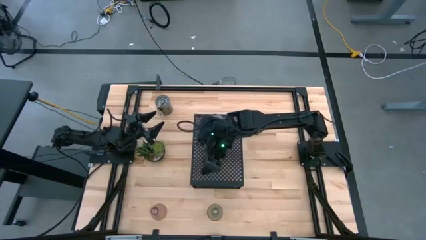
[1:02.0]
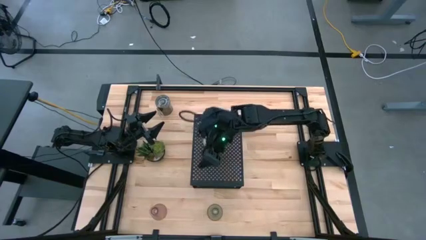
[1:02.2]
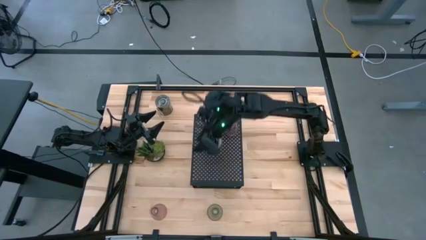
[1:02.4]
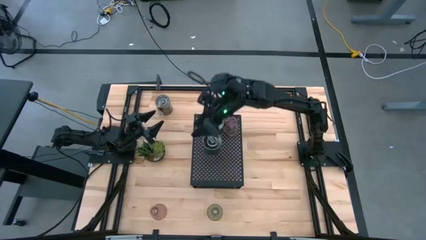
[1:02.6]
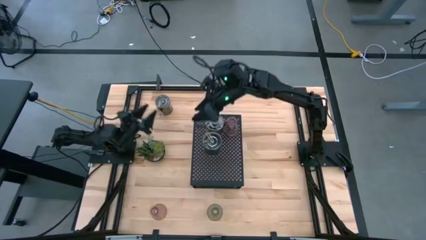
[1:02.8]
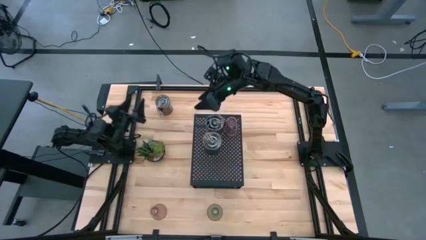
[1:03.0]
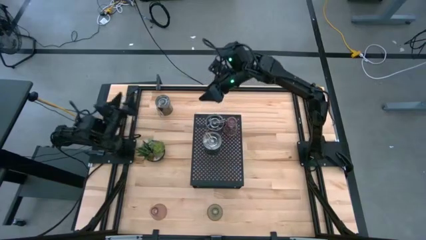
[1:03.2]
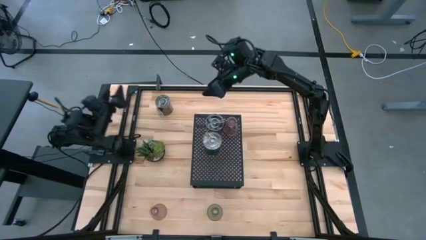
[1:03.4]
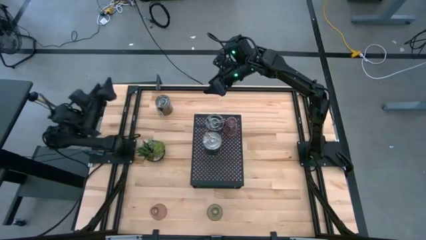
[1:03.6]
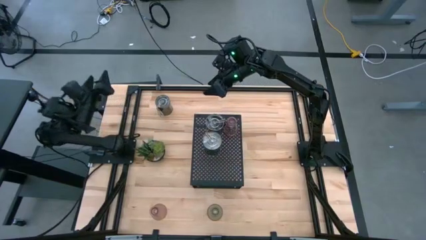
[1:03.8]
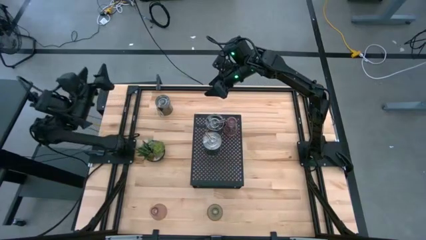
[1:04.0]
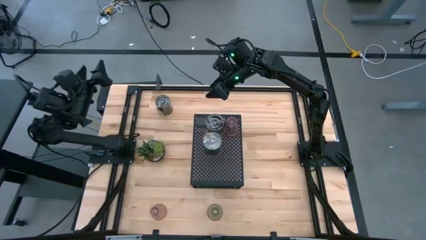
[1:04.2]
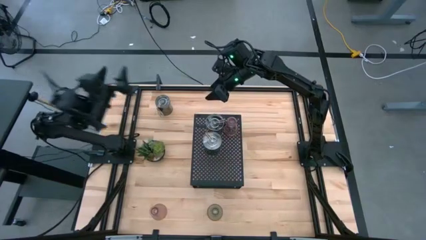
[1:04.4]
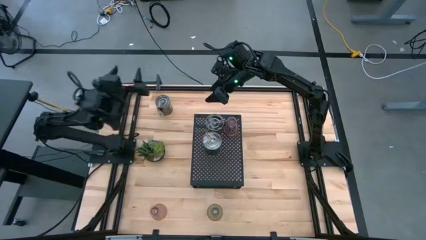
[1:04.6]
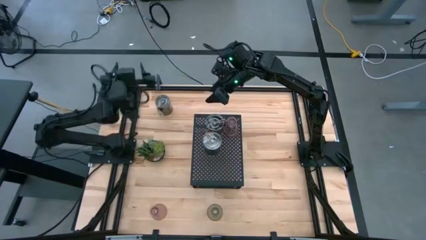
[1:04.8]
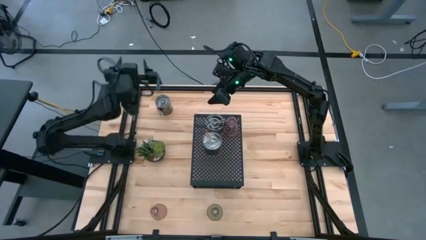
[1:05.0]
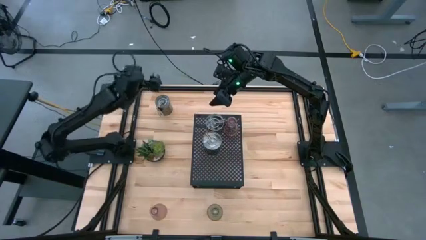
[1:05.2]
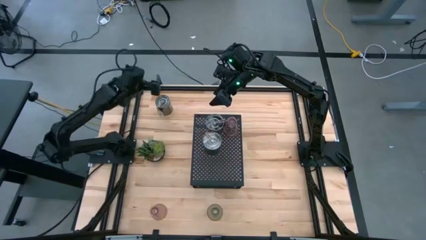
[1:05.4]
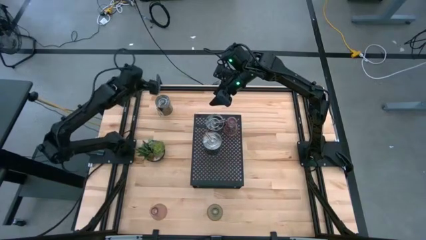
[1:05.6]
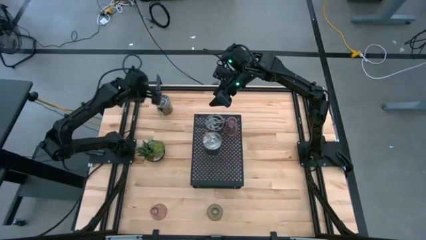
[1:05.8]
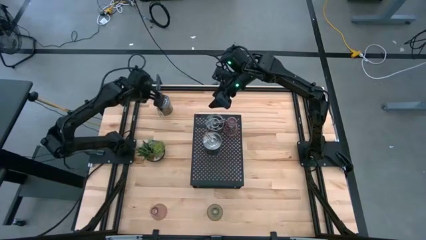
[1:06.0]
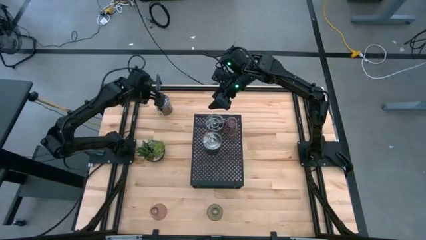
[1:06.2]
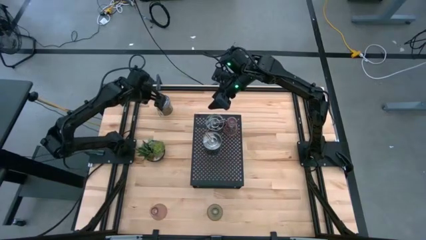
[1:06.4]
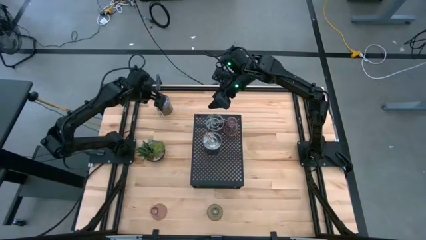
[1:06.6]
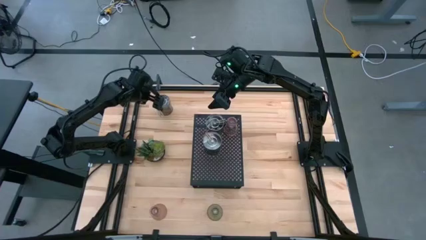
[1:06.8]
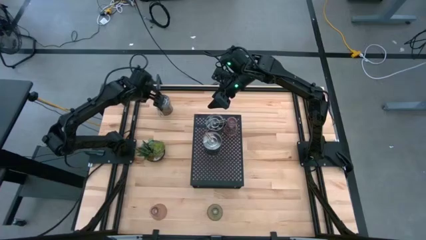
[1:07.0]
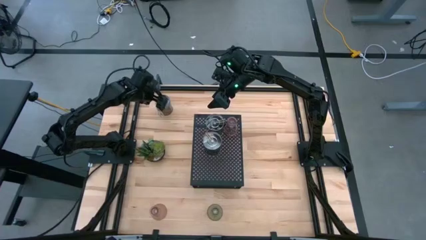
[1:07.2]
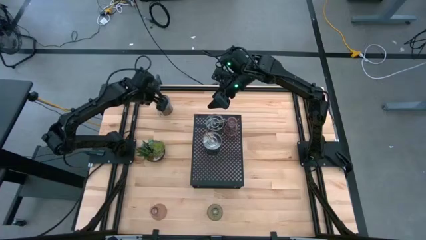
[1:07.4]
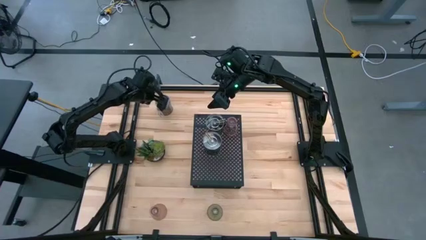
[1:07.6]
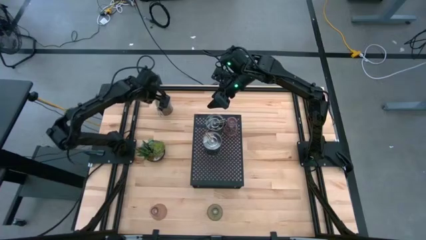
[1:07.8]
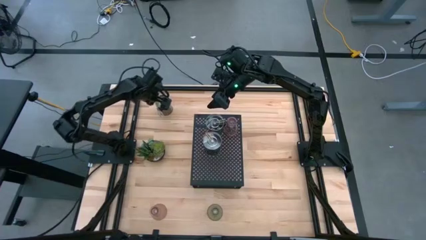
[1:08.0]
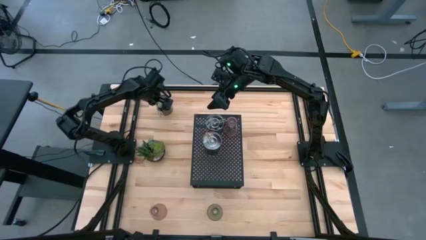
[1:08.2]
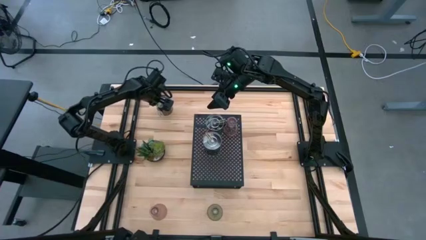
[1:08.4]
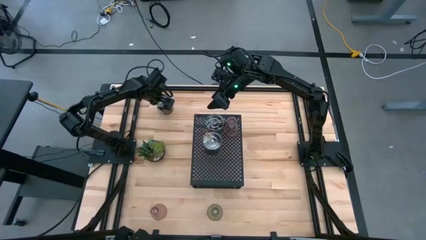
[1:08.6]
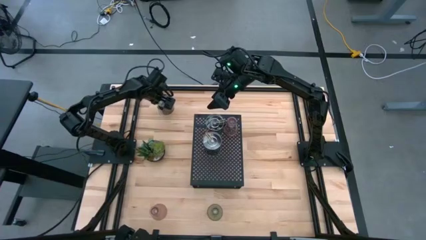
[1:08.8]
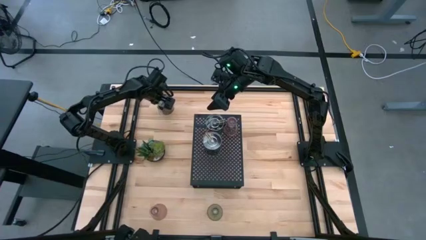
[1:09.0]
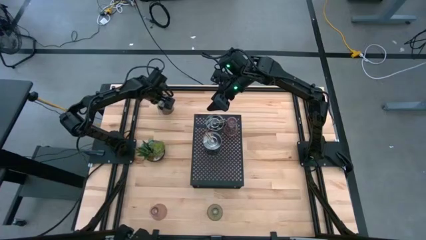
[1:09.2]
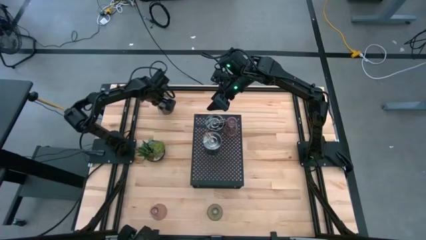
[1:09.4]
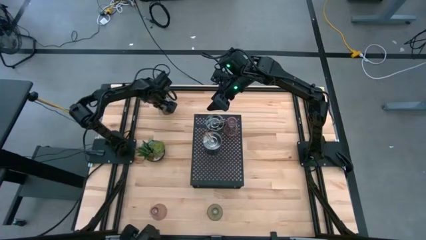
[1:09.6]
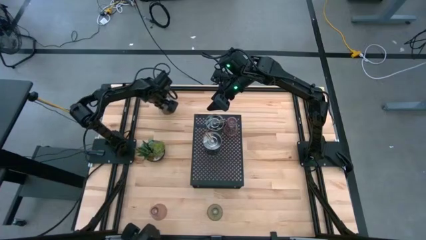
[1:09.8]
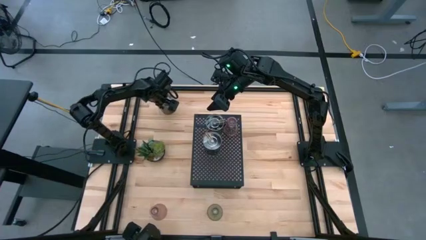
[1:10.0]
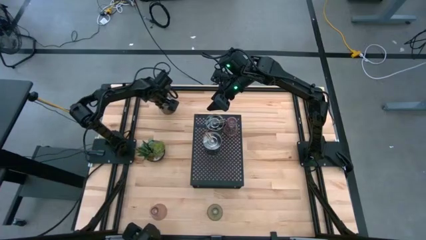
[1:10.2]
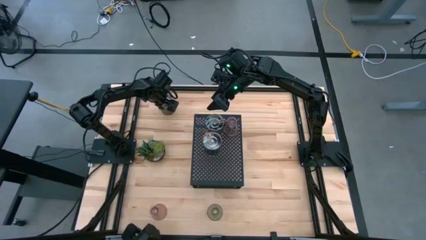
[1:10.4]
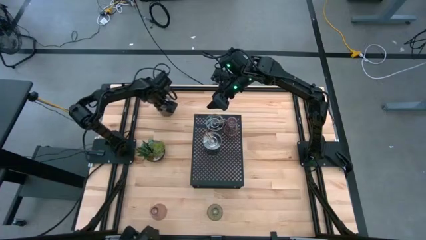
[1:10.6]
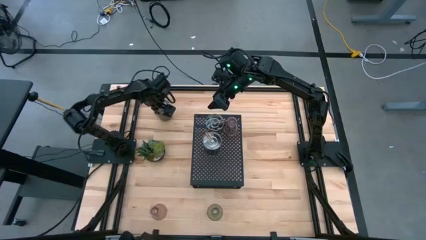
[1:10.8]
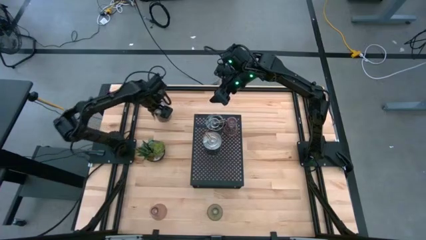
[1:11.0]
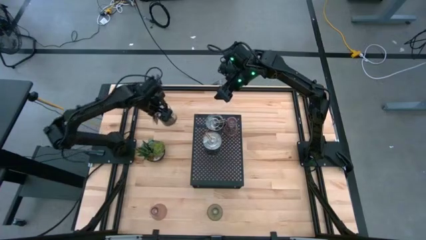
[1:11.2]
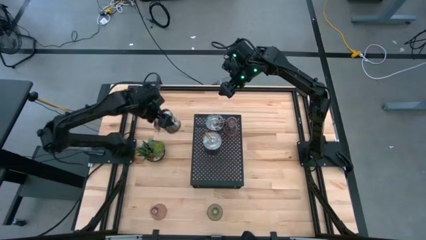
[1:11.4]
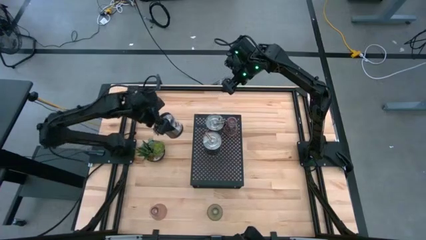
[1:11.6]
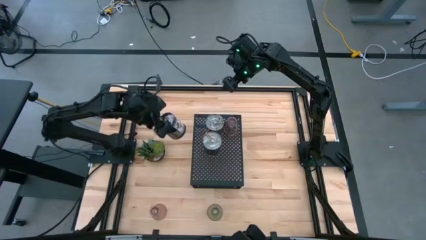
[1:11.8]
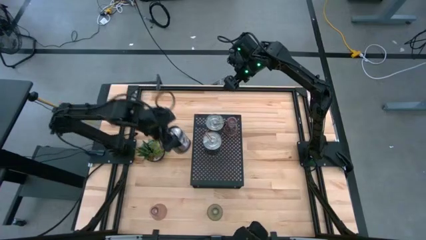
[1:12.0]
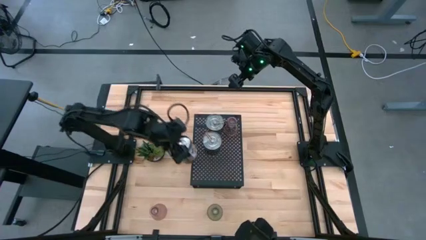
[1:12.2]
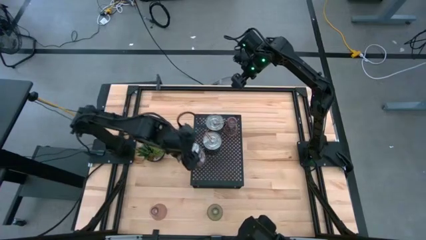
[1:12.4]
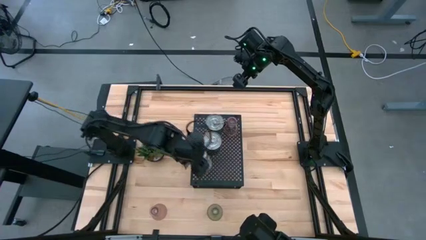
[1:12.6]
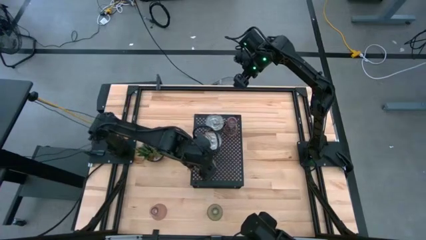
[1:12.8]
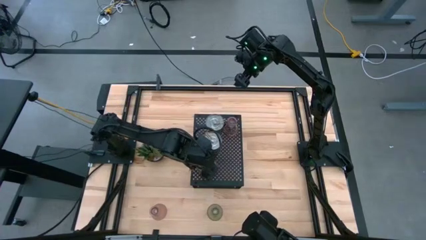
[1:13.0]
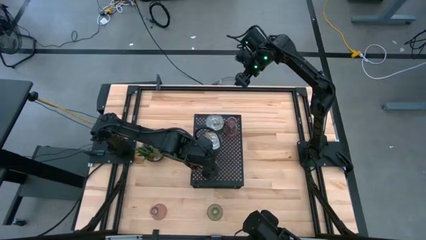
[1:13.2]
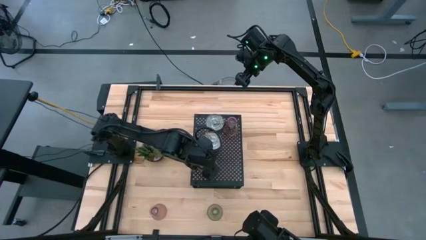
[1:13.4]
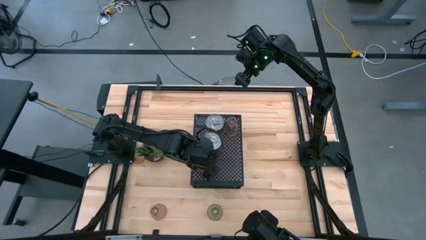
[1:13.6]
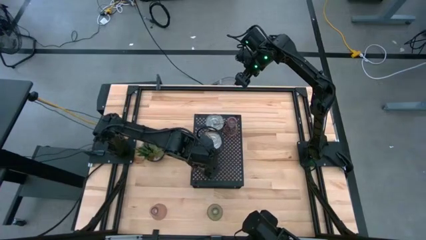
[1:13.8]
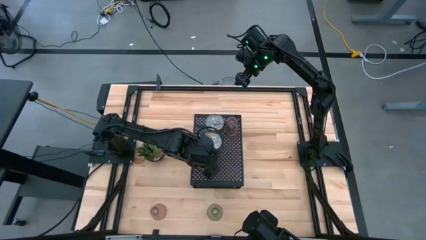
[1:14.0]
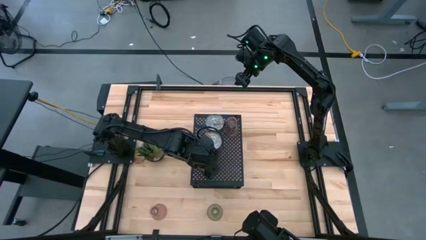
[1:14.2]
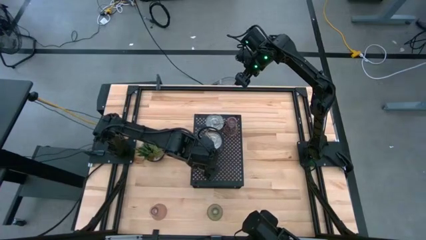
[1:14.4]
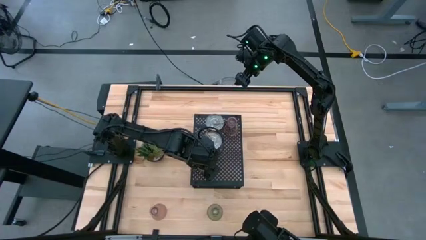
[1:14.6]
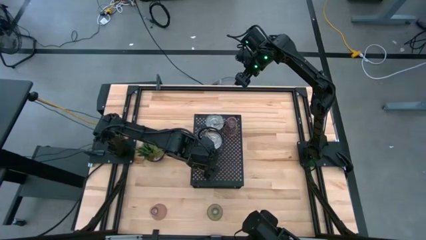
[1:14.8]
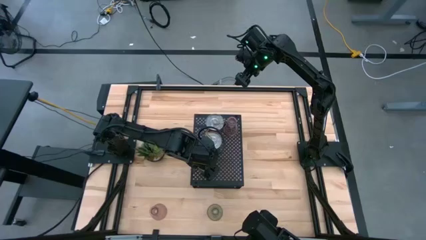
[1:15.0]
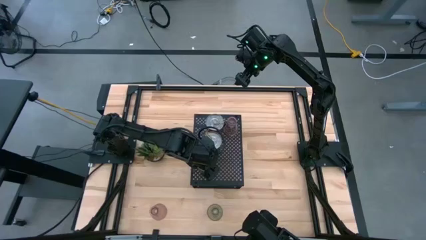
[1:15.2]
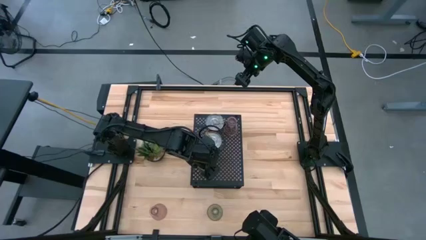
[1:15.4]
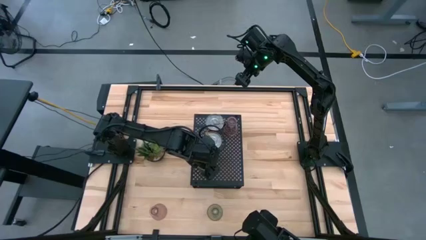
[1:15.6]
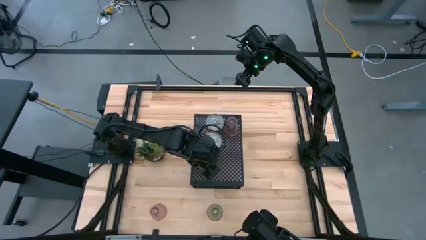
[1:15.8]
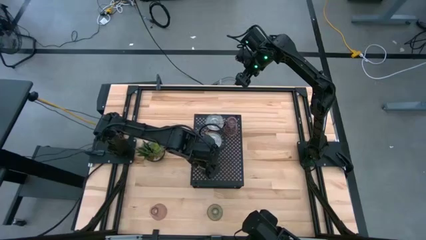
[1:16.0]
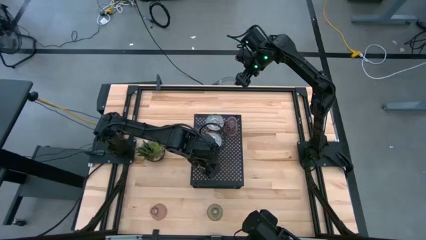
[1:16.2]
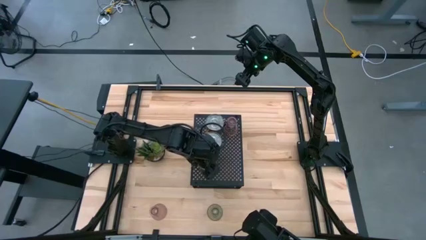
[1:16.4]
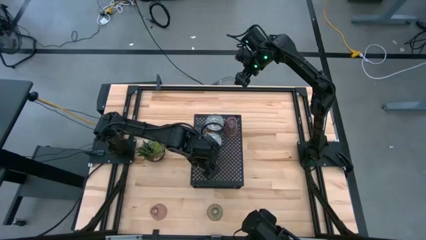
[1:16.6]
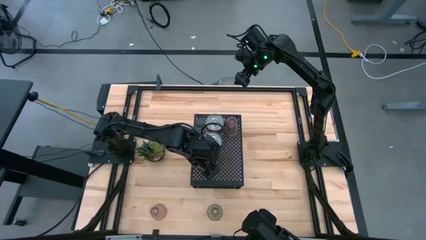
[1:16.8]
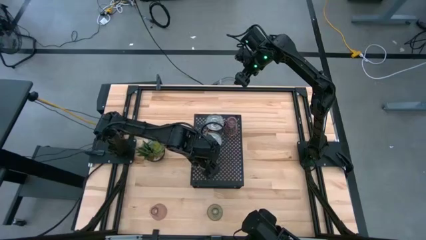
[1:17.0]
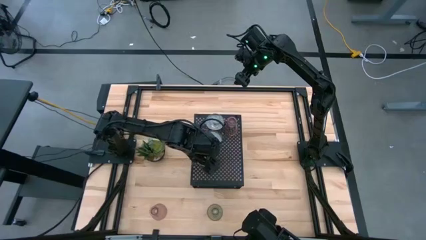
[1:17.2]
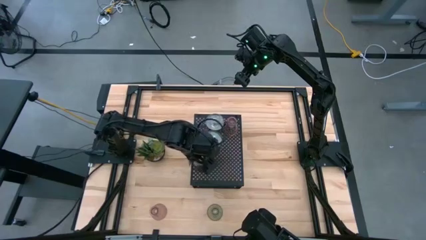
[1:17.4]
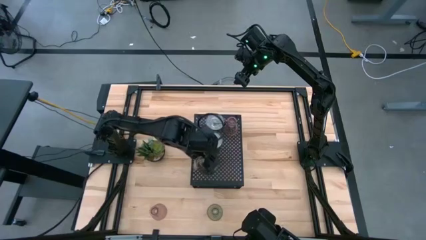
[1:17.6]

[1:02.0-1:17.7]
Task: Pick & Place candle stick holders
Put the silver scented candle on the shelf aligned with the silver scented candle

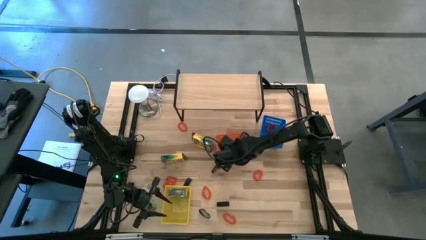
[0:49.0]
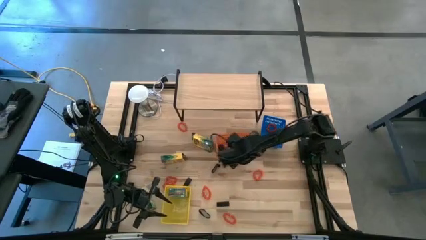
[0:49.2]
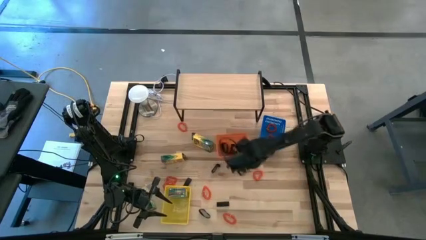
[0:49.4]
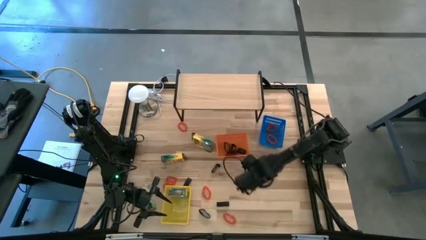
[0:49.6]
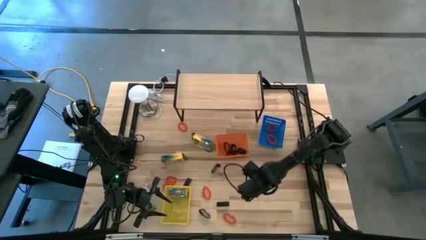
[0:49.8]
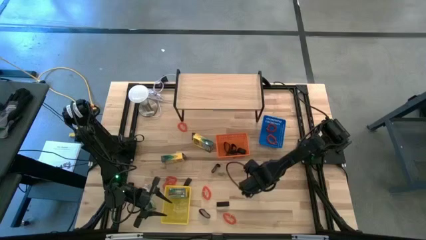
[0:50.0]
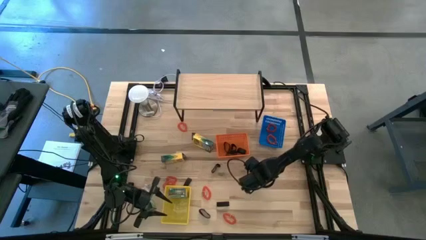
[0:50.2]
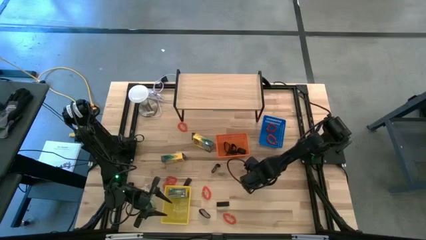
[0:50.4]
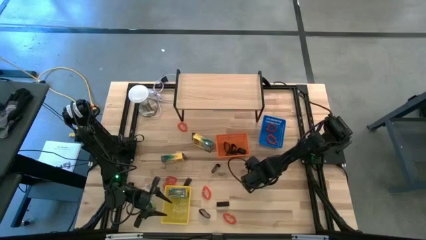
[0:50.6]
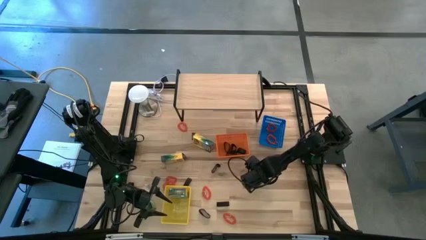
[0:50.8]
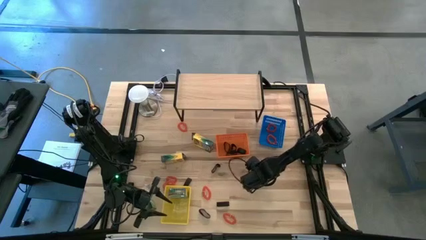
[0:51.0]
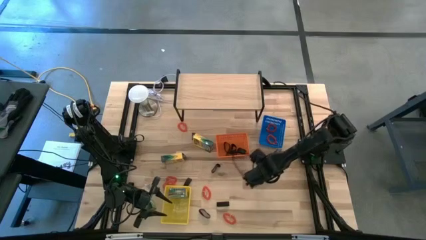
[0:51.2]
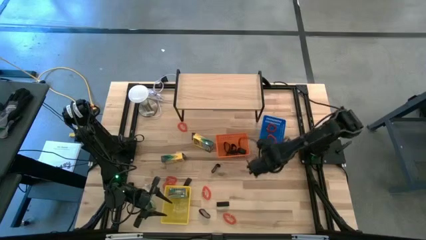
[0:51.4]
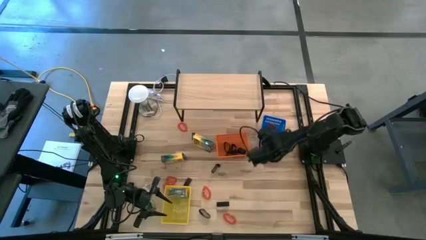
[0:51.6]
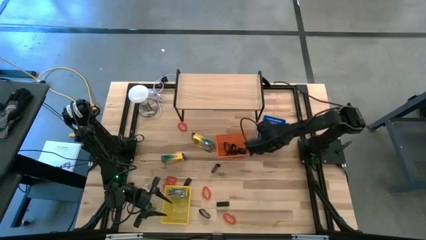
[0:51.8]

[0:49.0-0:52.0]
Task: Pick & Place Office Desk Supplies
Put the spring keychain into the blue bin
